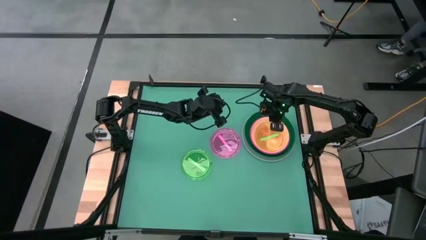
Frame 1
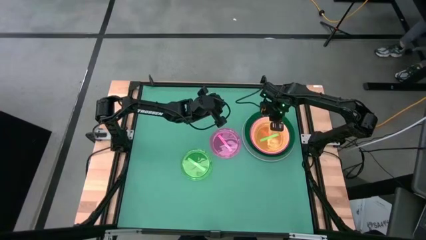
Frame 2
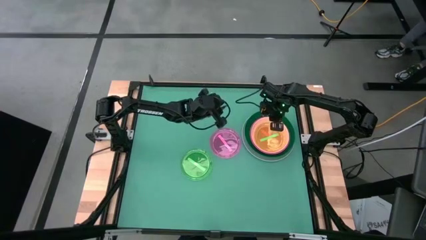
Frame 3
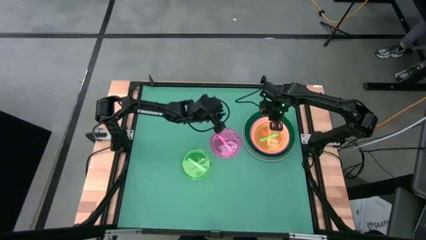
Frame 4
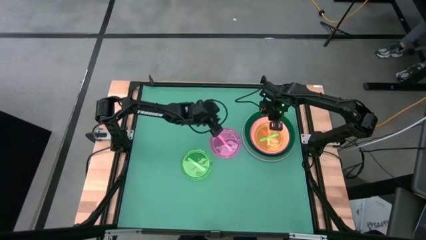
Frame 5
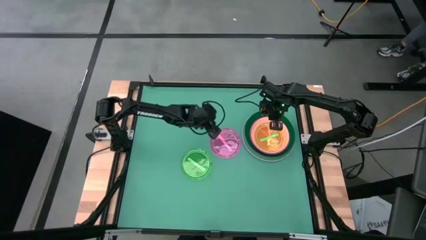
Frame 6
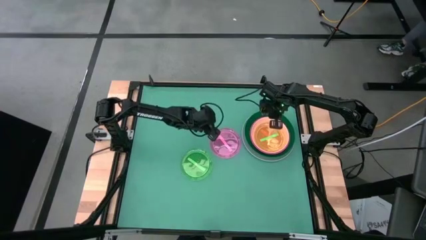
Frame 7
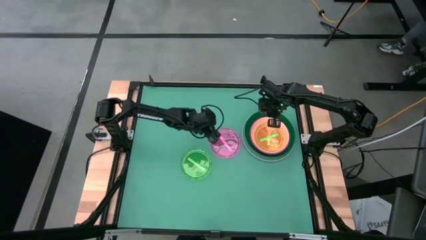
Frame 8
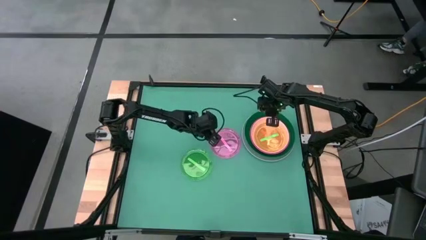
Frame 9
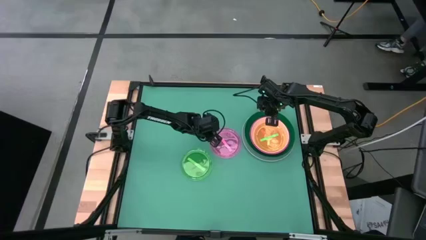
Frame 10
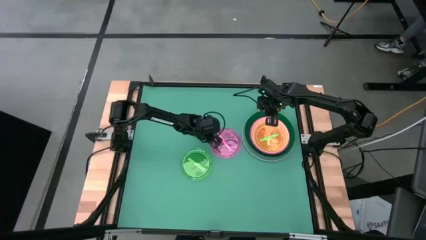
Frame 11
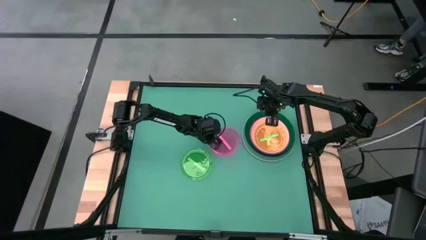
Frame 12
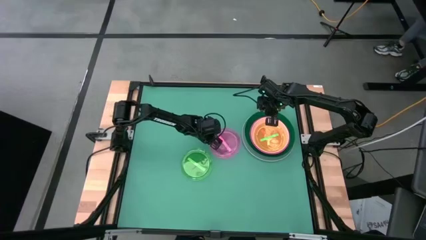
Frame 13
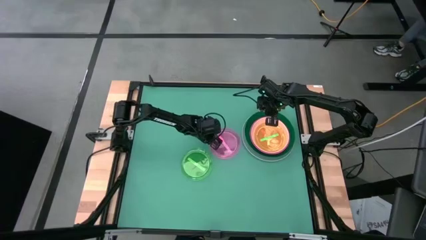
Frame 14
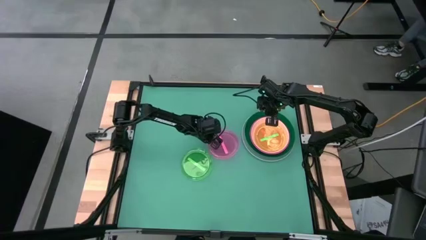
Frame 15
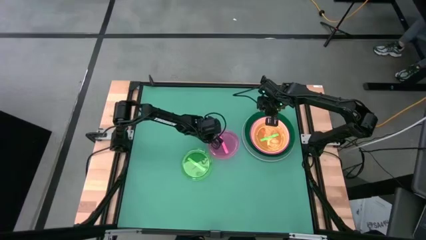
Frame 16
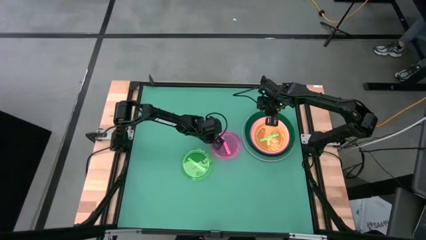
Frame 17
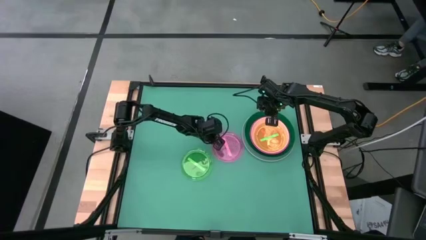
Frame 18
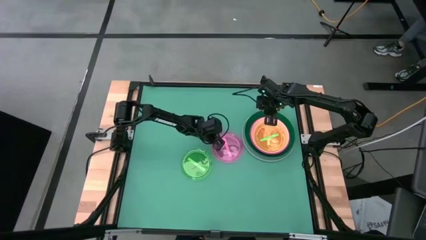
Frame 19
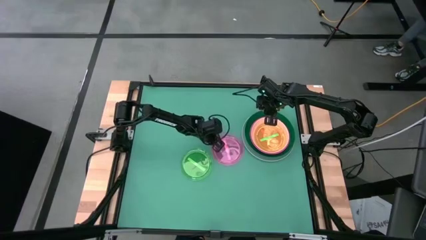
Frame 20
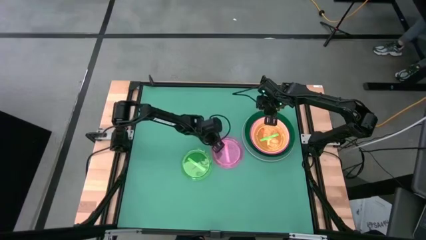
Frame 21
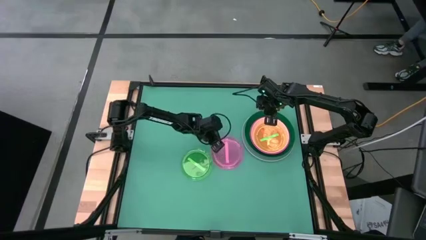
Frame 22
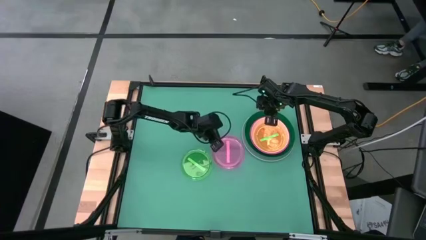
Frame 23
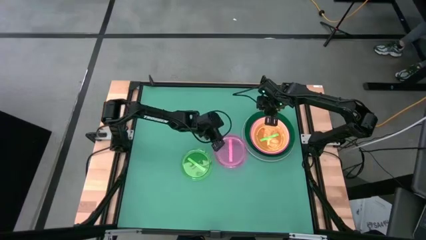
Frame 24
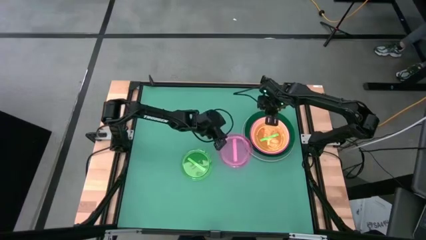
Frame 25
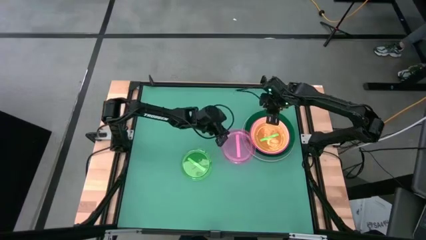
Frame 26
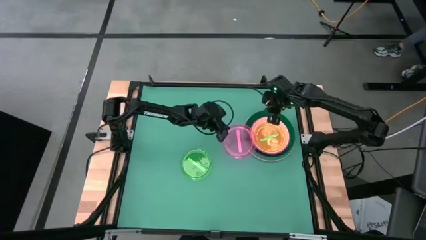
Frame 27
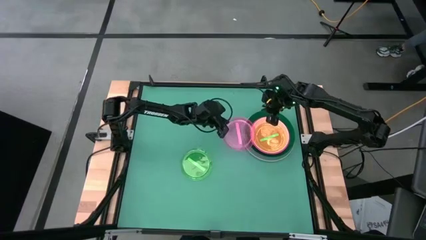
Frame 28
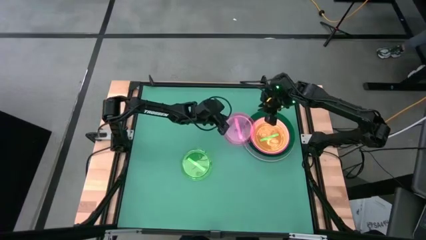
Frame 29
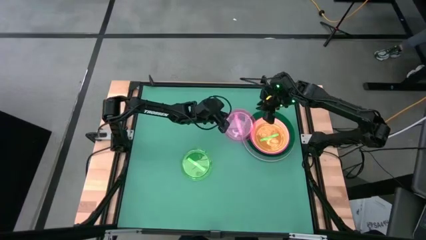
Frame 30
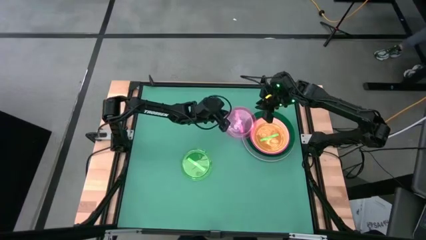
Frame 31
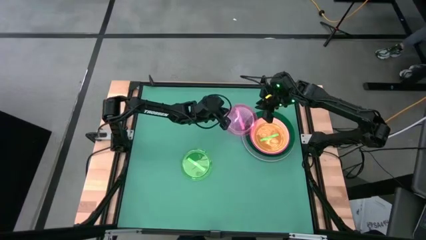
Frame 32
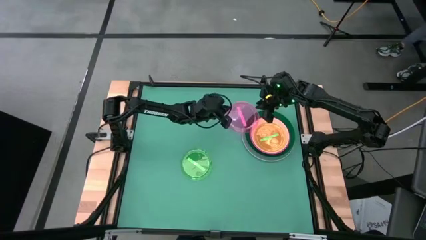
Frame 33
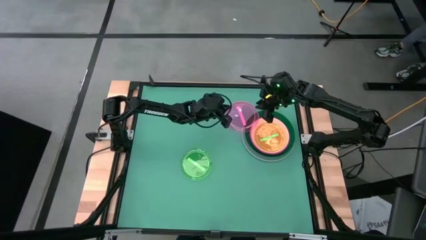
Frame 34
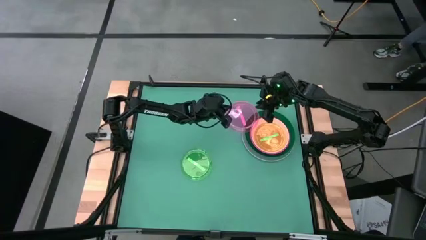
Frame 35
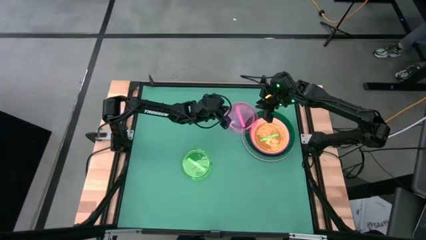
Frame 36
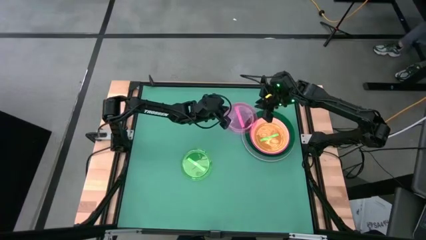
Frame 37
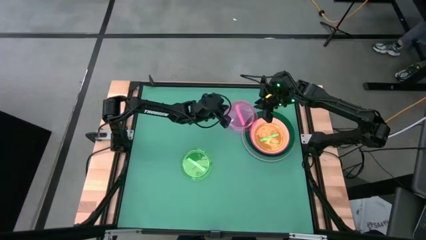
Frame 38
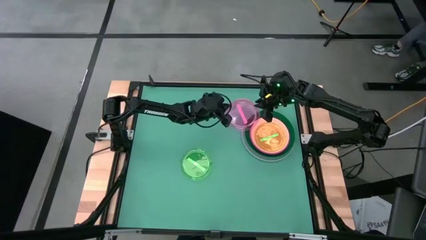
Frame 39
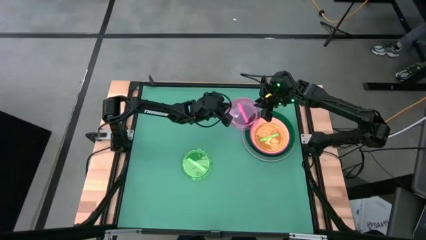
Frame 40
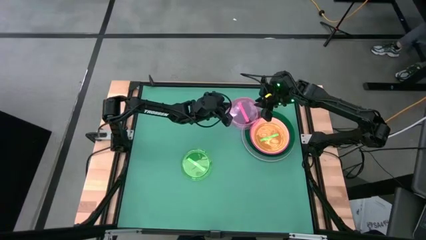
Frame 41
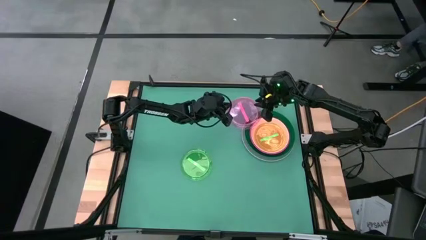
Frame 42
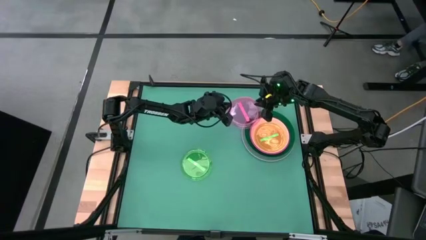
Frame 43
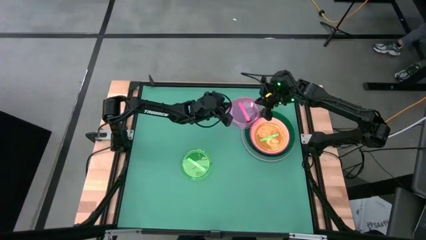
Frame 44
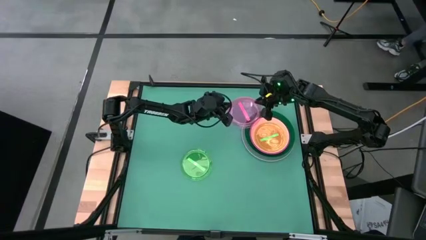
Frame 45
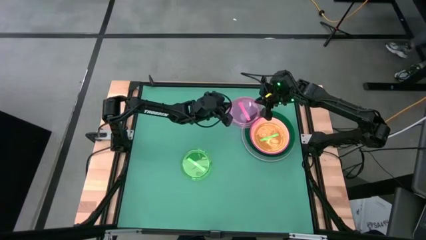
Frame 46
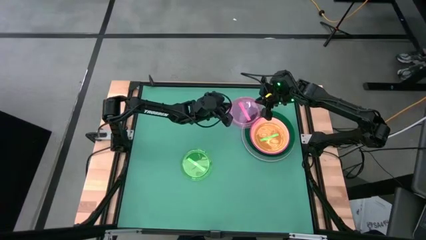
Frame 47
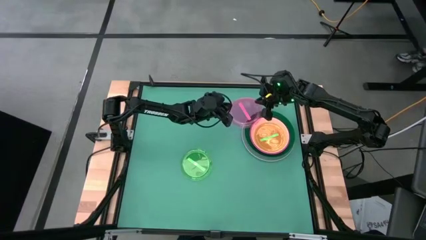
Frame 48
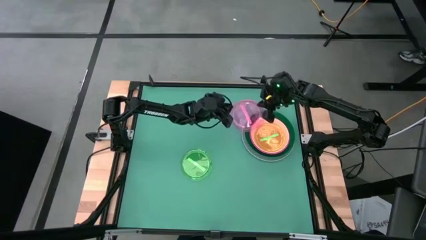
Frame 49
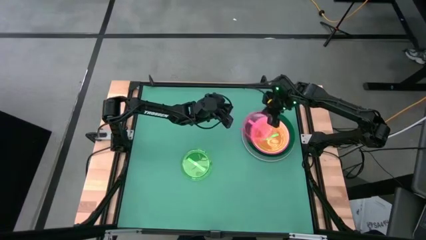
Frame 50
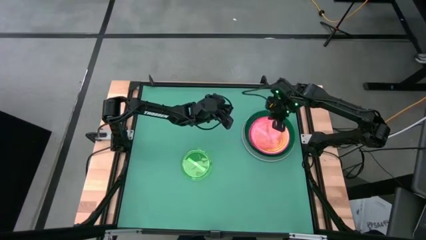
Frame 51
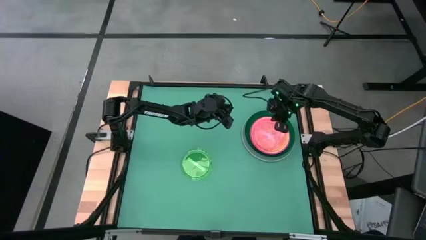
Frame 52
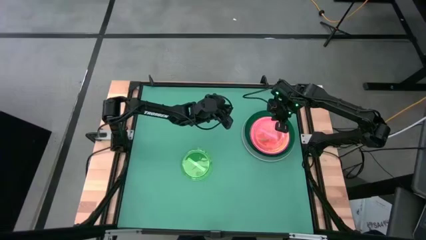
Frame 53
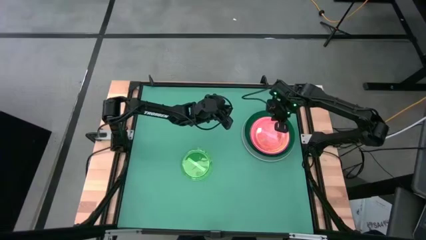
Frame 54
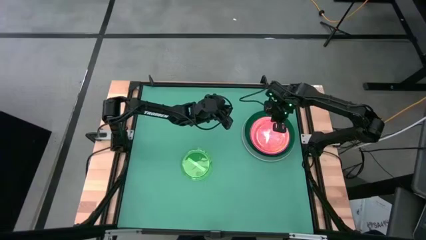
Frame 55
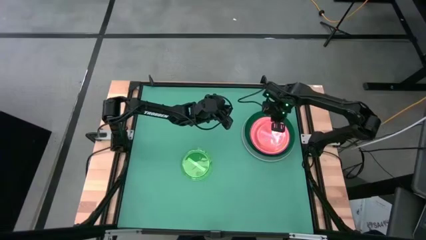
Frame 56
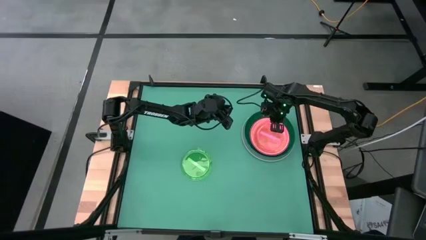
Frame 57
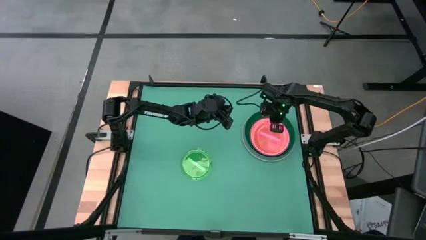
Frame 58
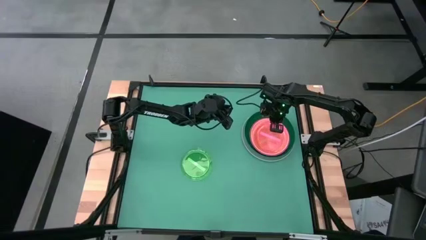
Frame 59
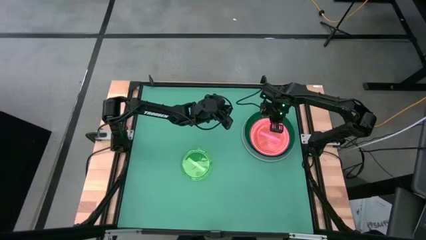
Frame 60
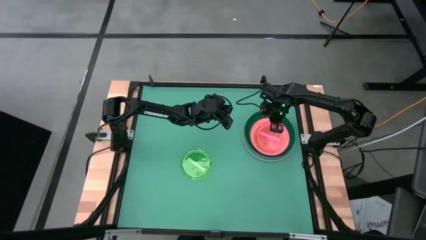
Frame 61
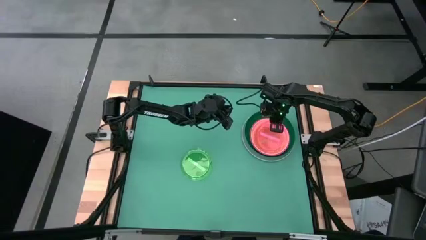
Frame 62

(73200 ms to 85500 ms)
Task: Stack plastic plates
Stack the light pink plate on top of the right light green plate

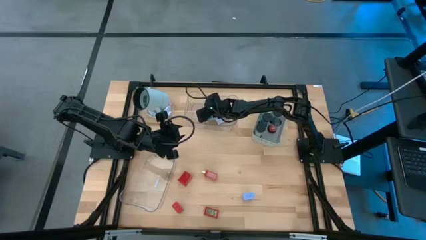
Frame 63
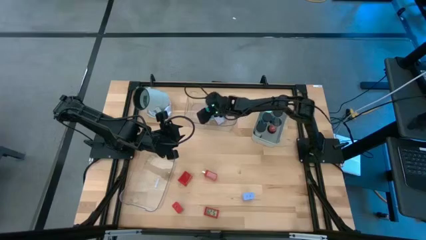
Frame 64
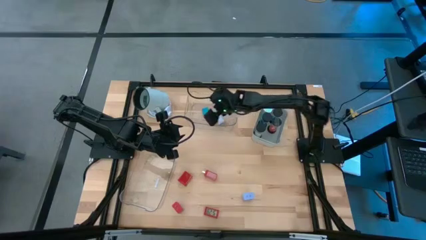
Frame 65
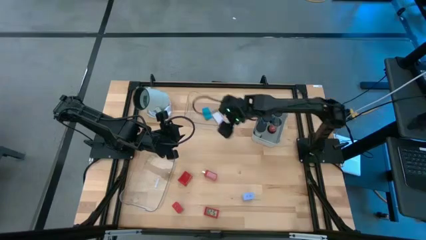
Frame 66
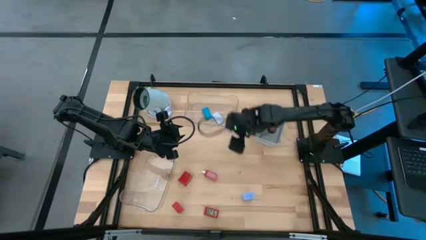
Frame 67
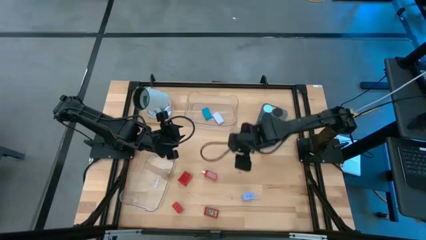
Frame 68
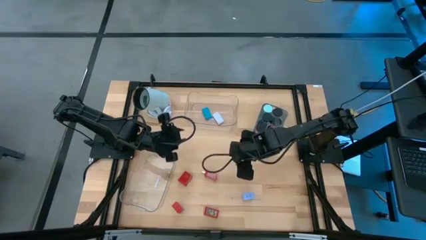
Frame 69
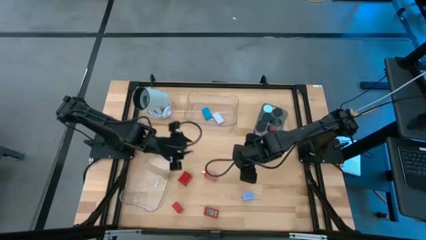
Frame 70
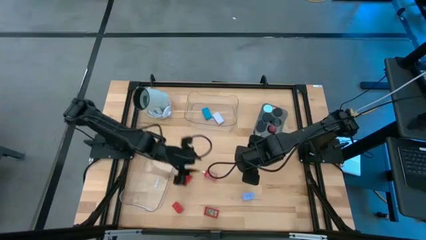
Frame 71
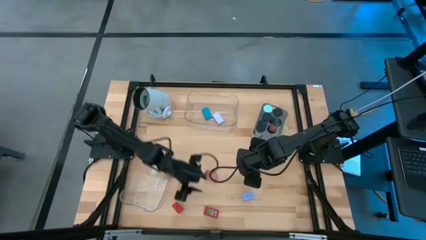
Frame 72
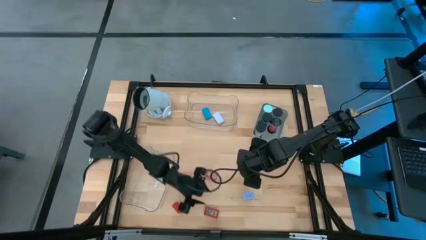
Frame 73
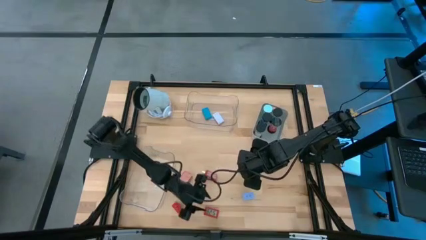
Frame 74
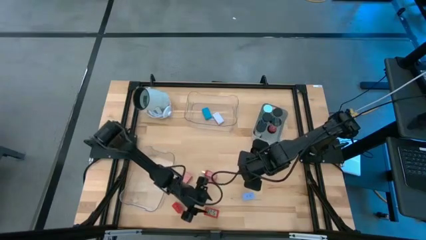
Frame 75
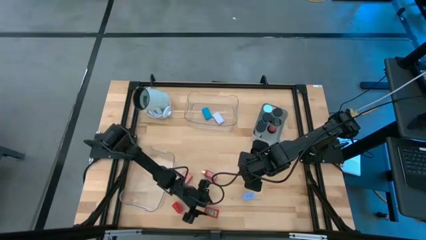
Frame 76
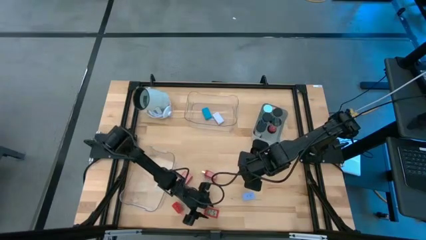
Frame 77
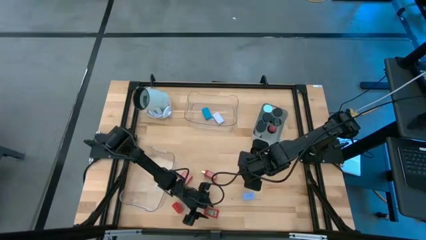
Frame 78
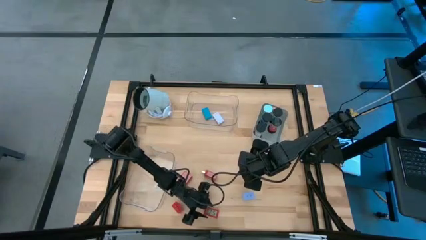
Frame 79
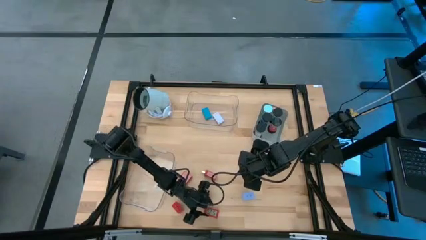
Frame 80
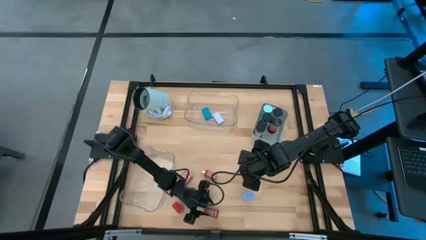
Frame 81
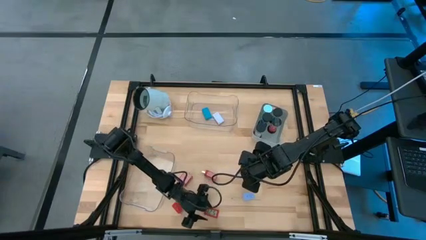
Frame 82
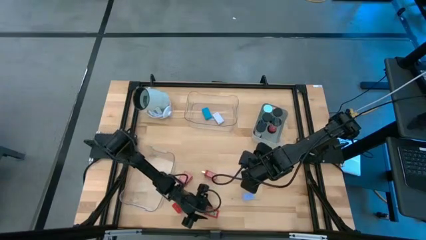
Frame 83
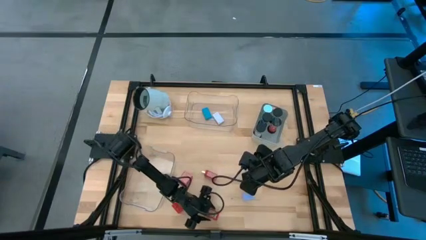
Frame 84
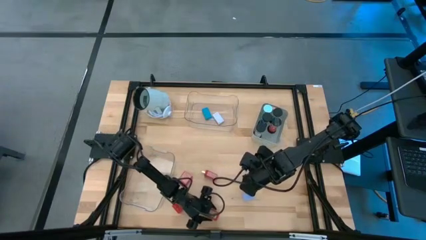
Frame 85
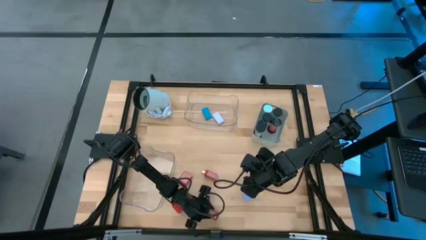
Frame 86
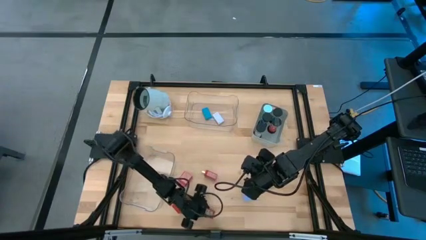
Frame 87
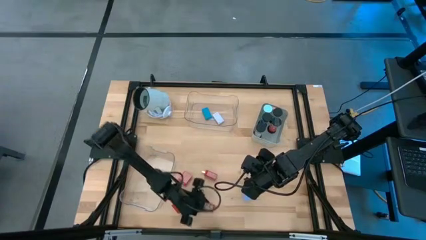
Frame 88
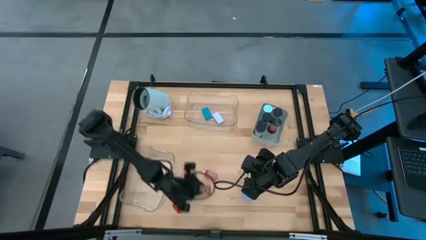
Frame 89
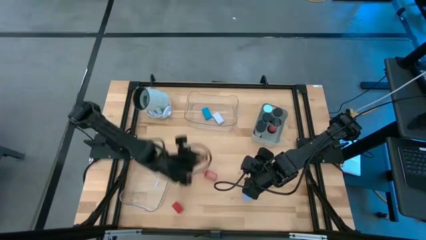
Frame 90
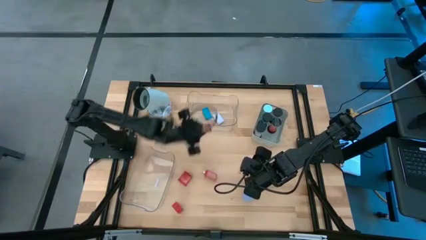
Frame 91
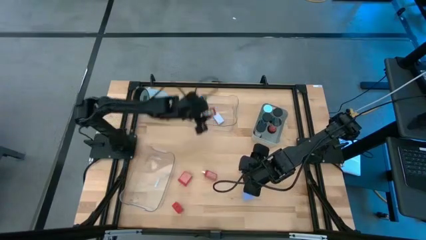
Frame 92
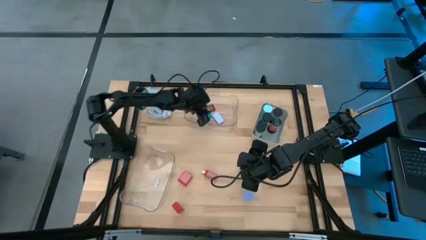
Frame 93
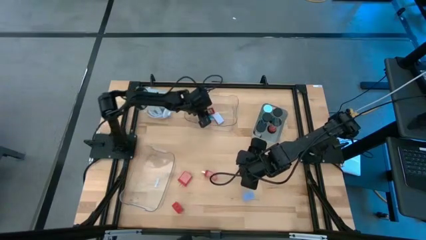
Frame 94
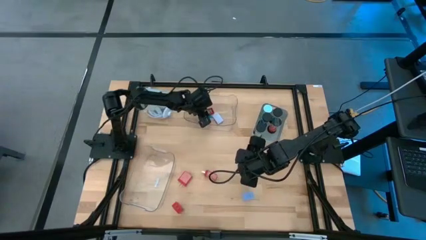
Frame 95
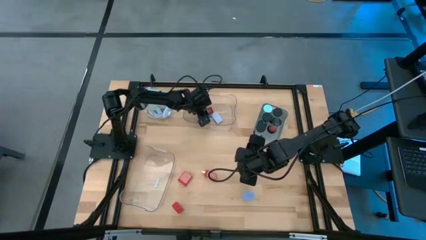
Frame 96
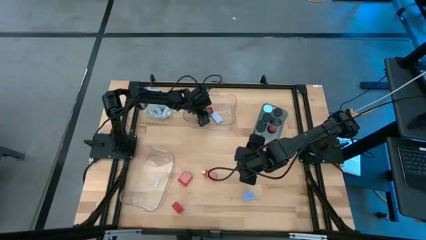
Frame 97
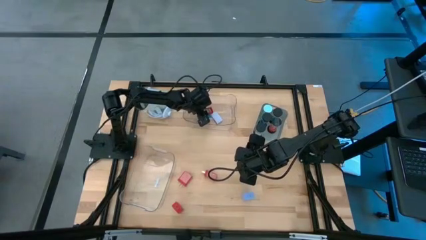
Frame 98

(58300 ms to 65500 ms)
Task: Pick & Place Office items
Put the red digital timer clock into the top clear bin
